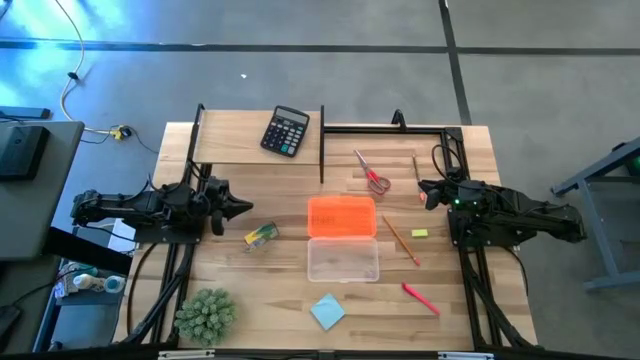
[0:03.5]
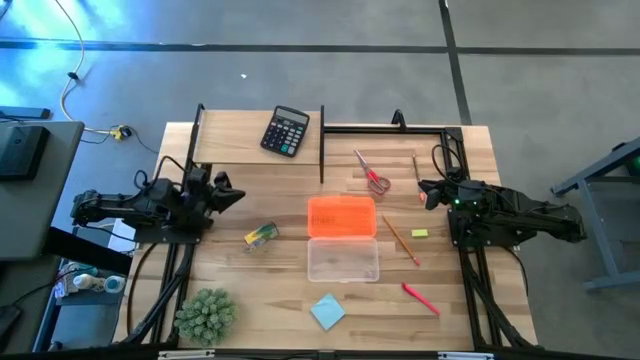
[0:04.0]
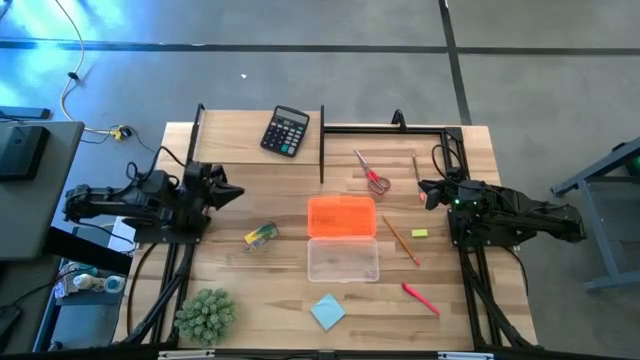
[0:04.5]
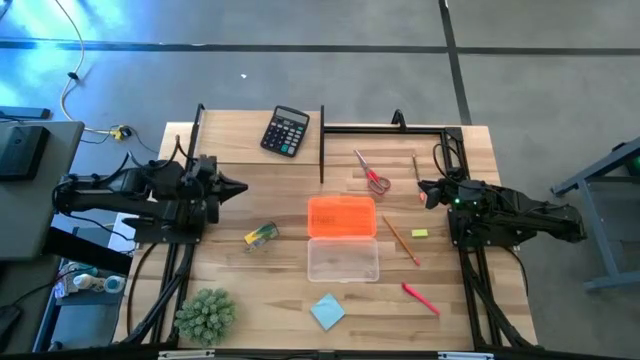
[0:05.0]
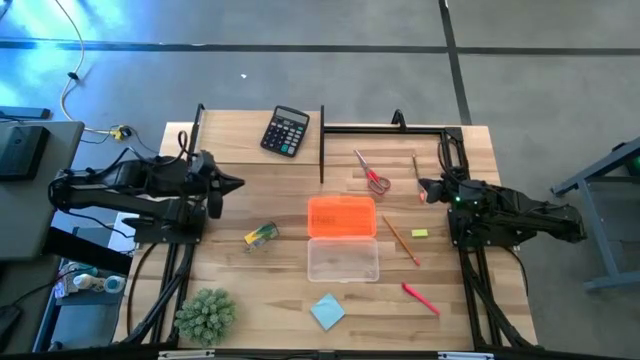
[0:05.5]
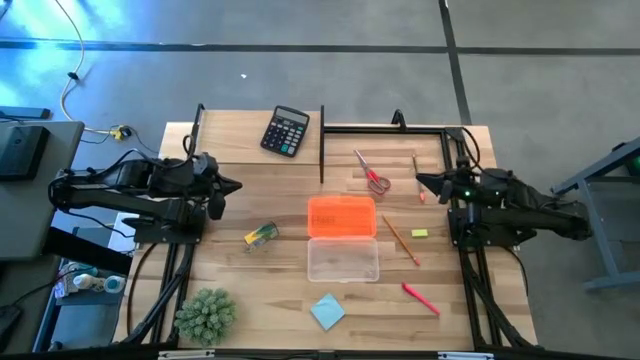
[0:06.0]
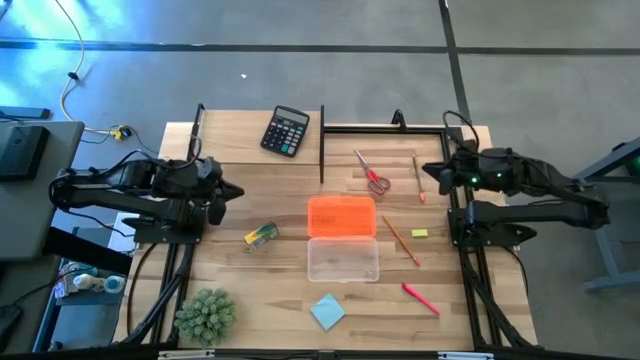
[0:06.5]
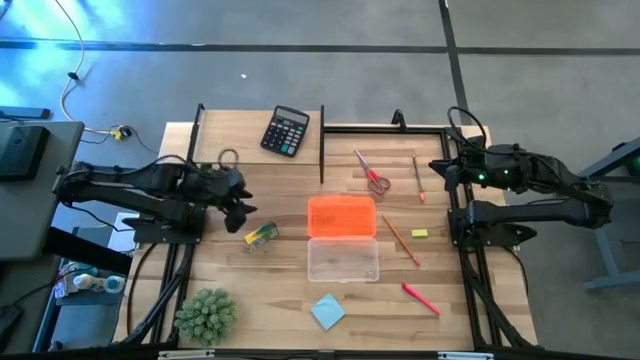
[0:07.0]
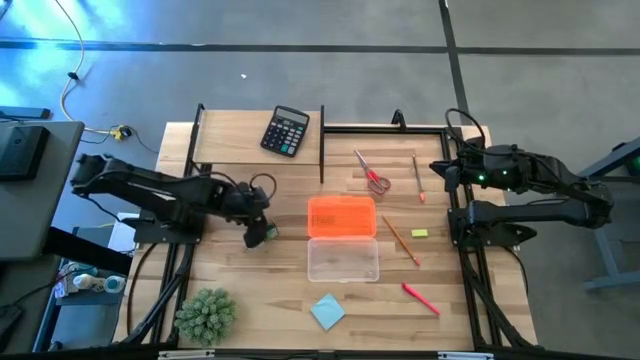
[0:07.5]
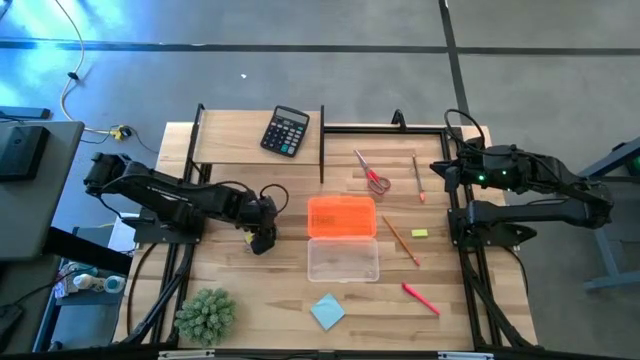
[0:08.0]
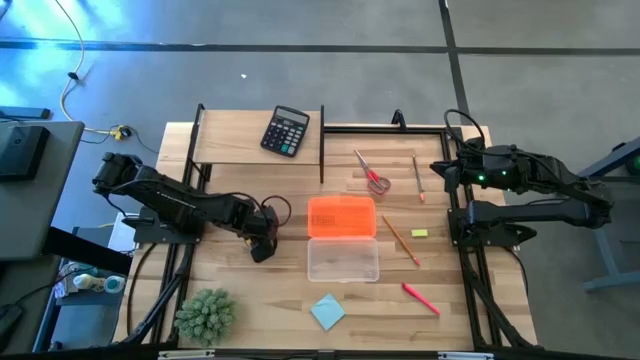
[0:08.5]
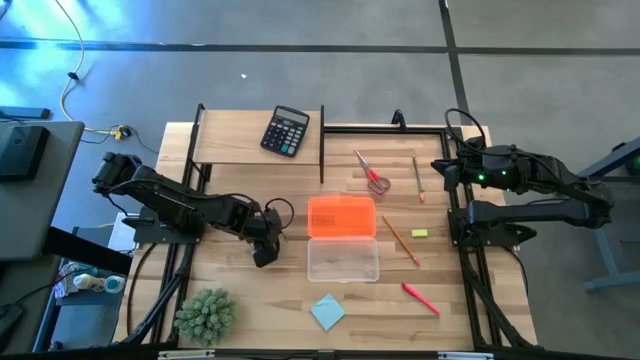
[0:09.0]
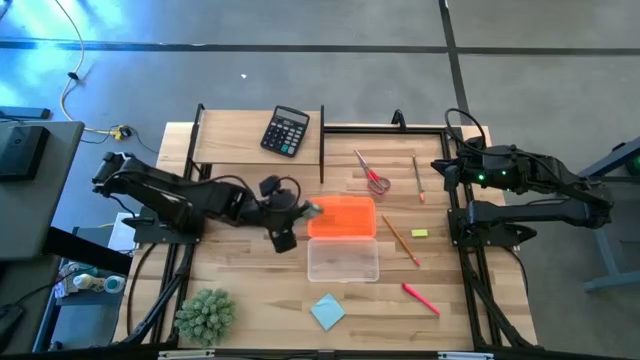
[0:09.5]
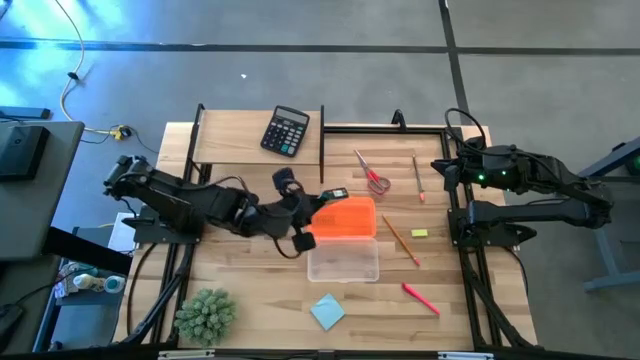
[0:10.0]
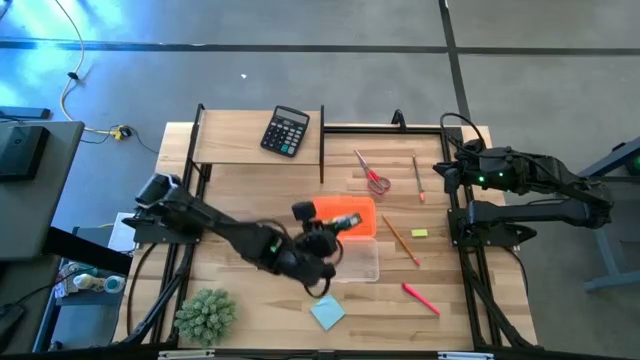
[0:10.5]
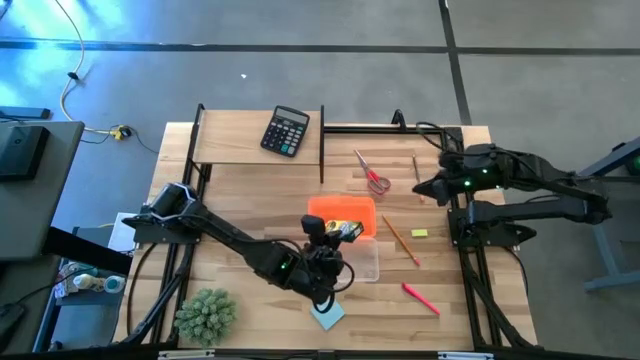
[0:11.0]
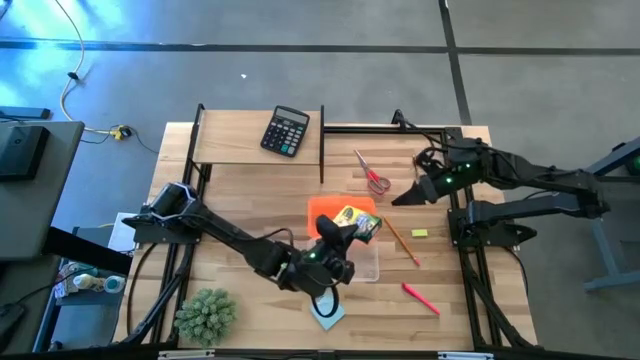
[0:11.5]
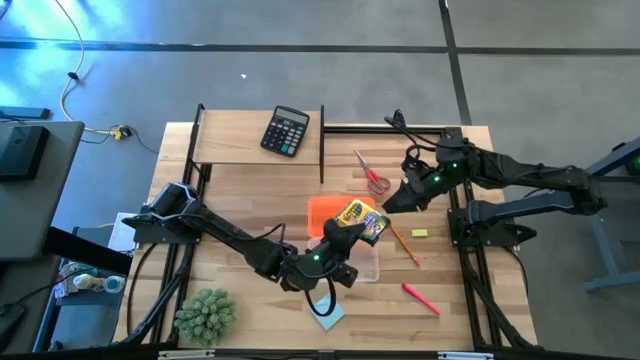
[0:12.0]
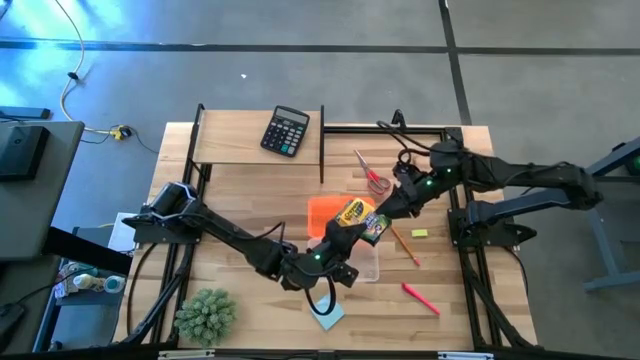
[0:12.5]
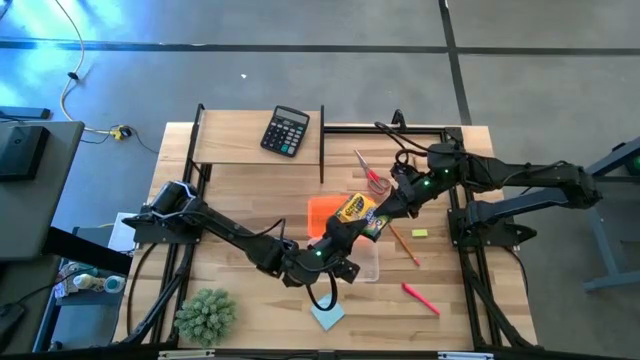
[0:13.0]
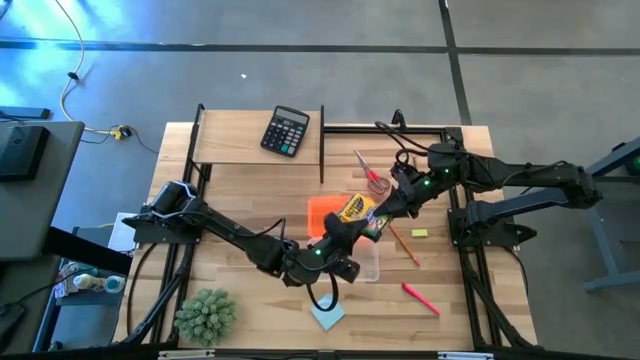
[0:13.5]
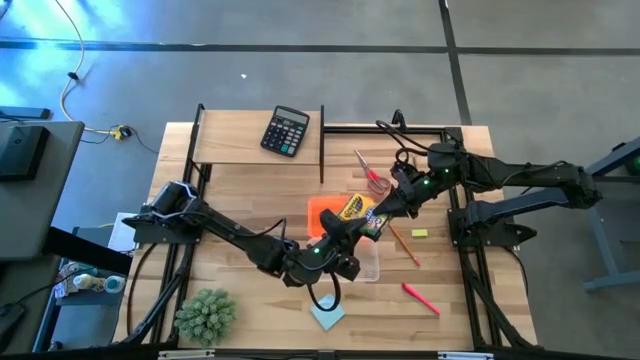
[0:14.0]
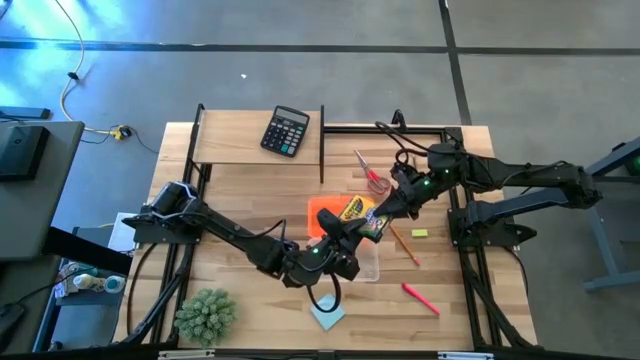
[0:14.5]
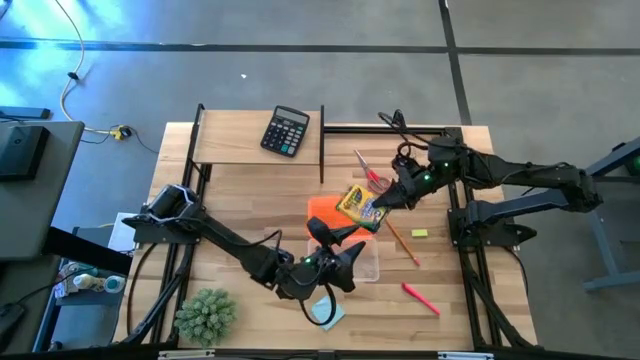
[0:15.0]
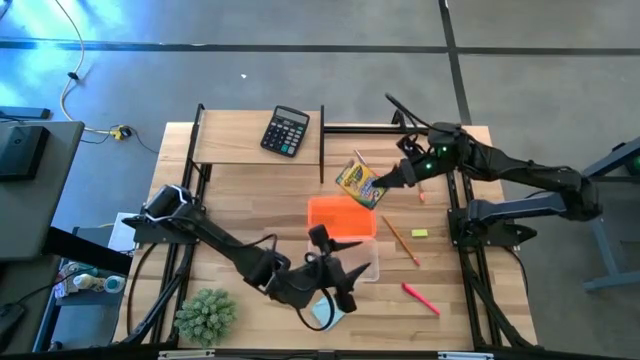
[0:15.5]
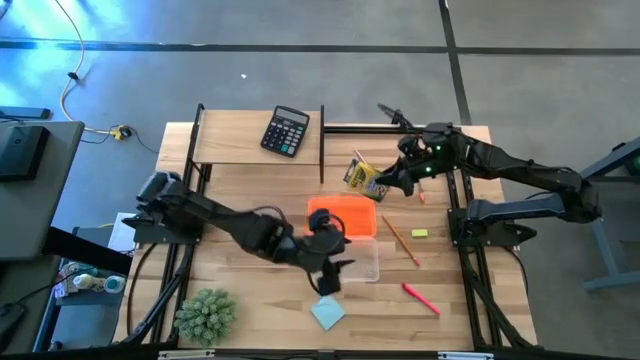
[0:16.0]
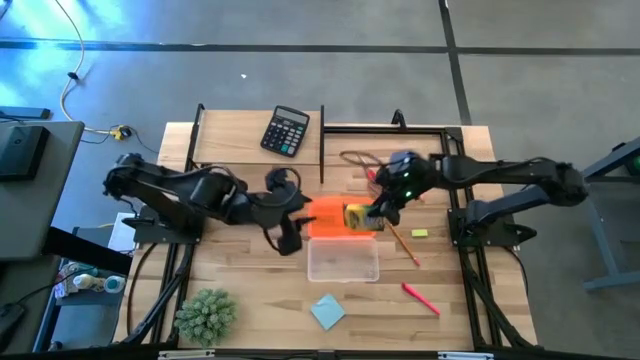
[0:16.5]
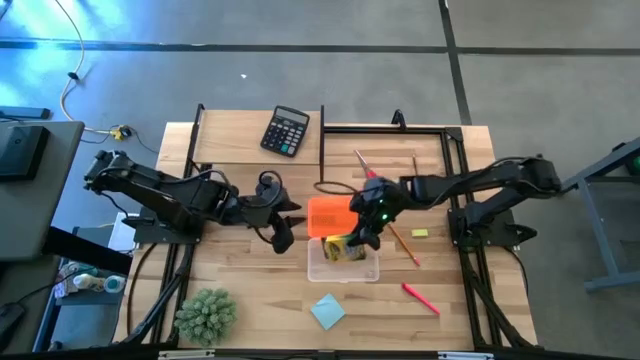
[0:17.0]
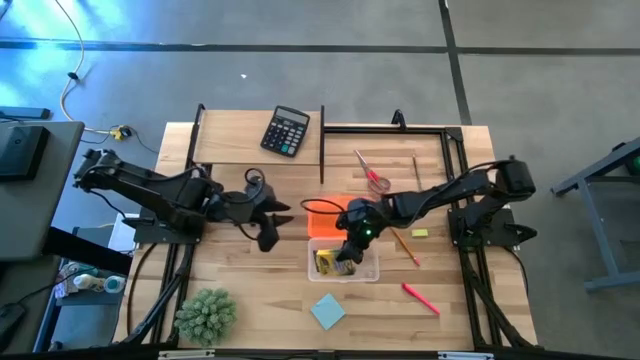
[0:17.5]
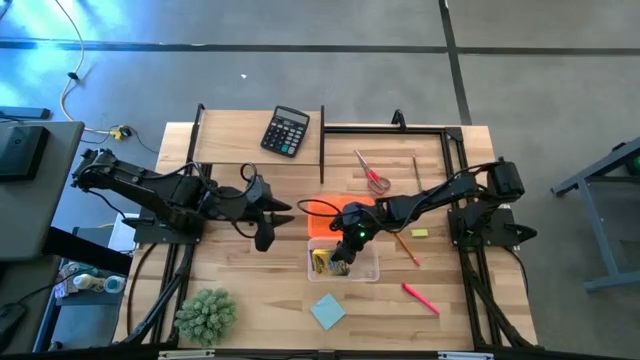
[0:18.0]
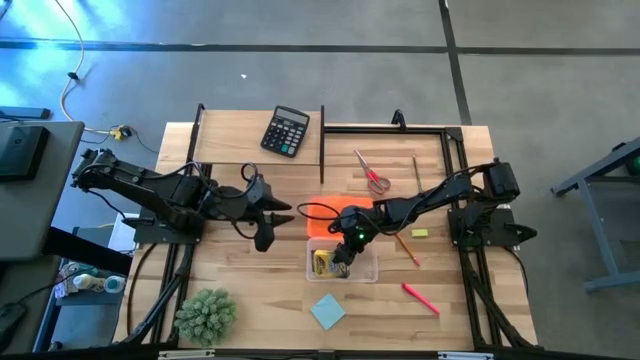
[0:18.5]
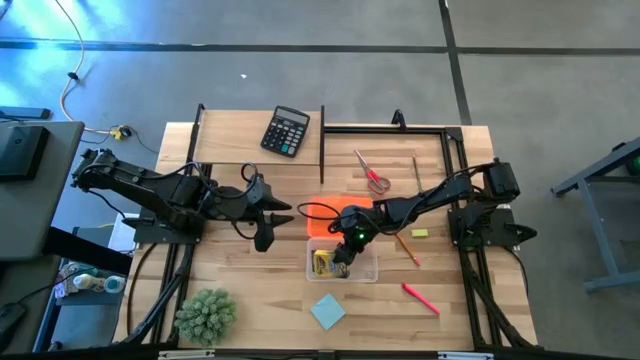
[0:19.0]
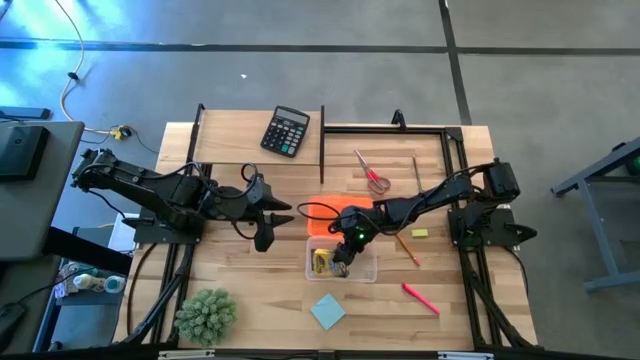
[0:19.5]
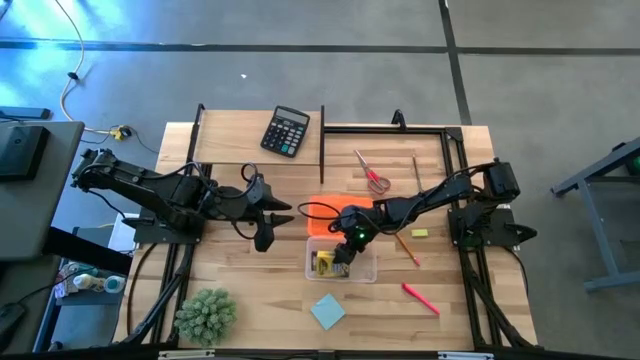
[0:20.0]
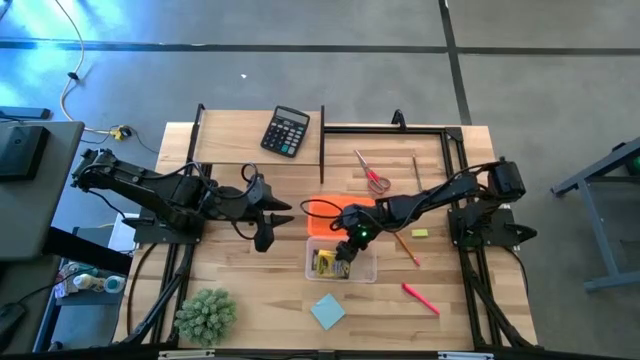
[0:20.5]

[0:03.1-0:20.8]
Task: Pack school essentials
Put the yellow crayon box into the supply box

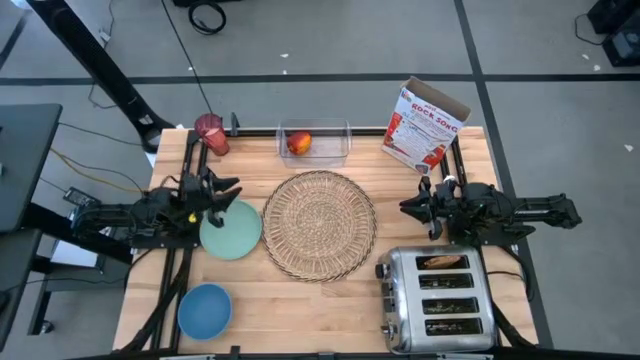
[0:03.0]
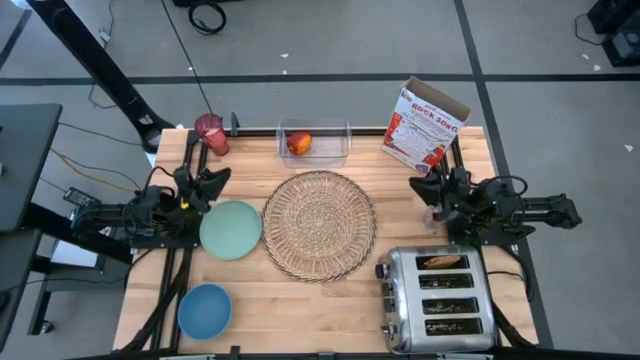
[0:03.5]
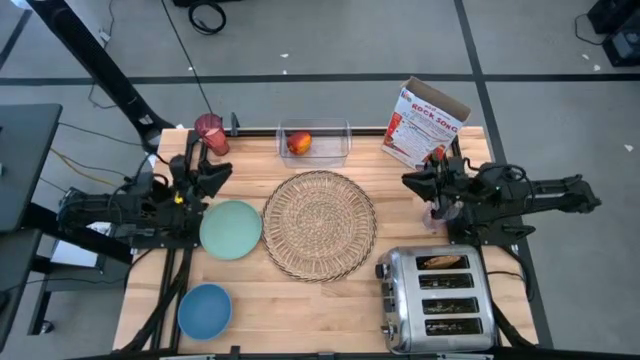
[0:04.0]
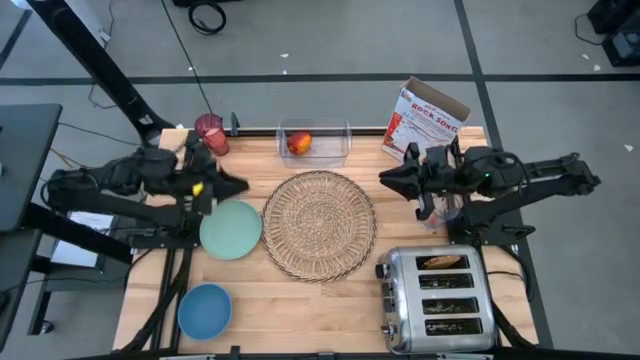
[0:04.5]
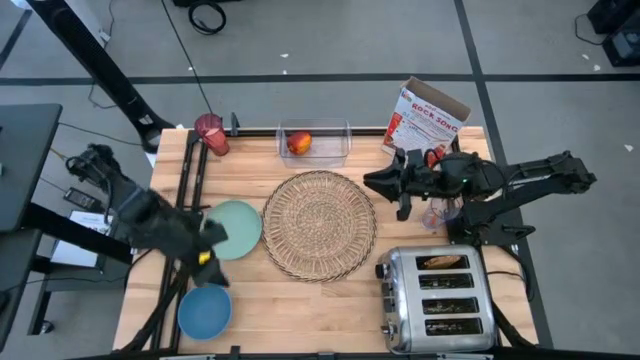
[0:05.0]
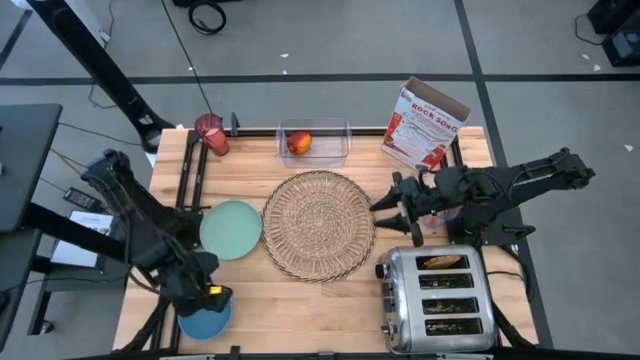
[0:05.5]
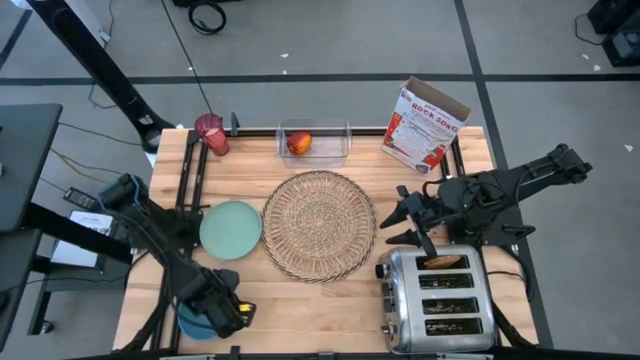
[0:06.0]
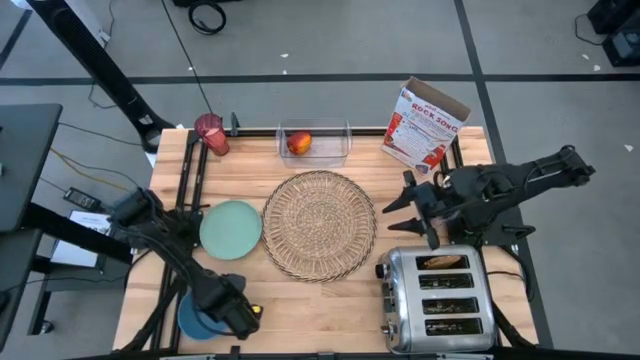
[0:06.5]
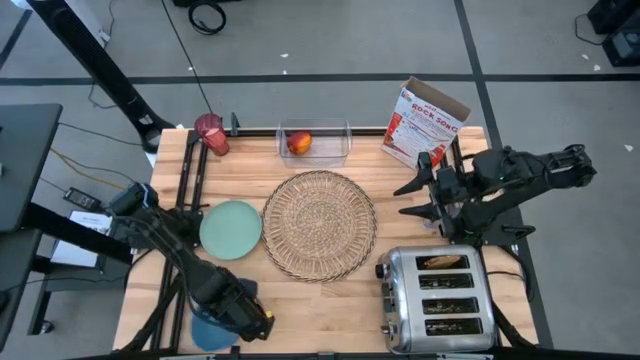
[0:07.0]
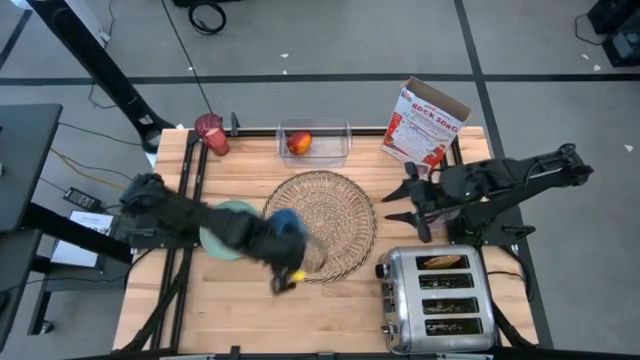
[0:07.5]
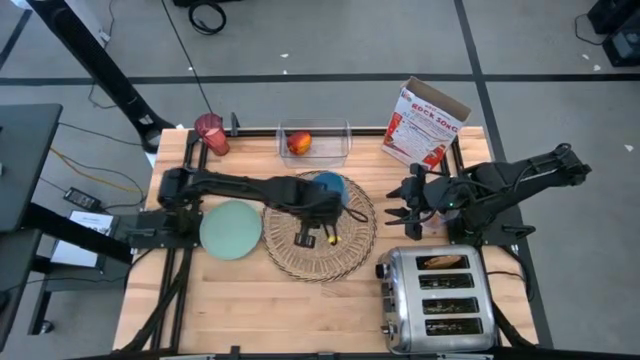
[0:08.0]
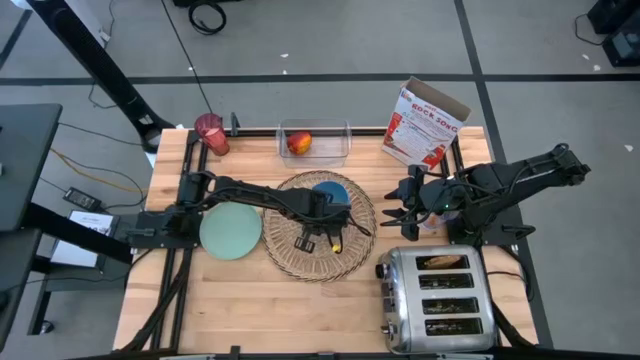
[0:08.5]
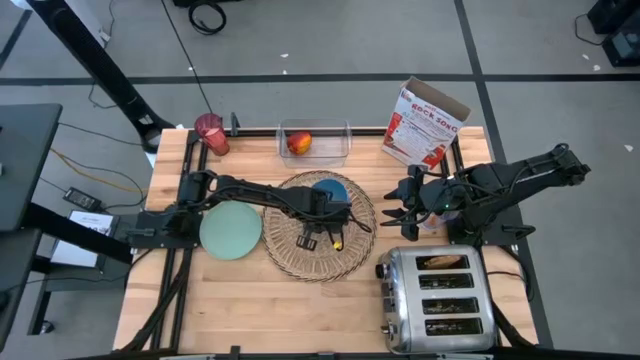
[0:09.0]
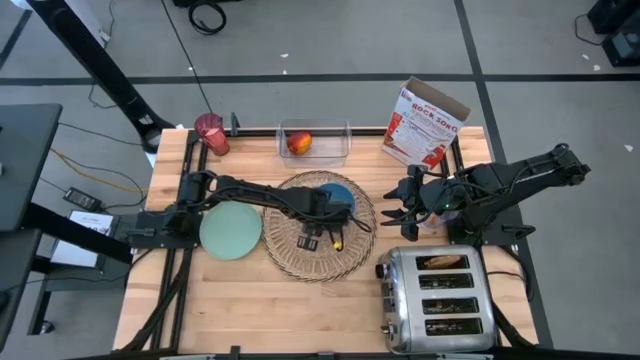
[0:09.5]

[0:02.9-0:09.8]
Task: Arrange a breakfast setting
Put the blue bowl on the table mat
